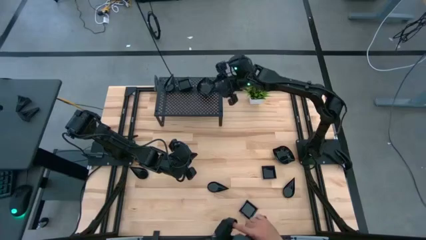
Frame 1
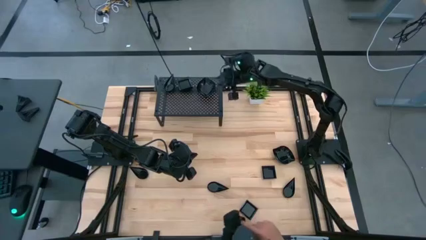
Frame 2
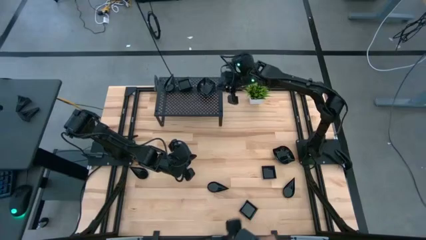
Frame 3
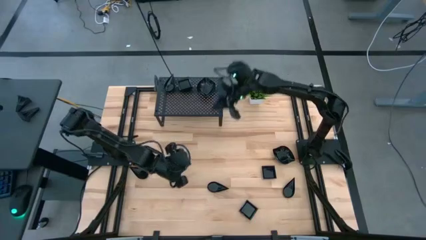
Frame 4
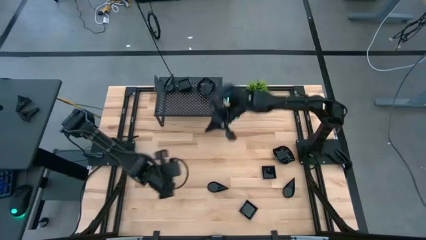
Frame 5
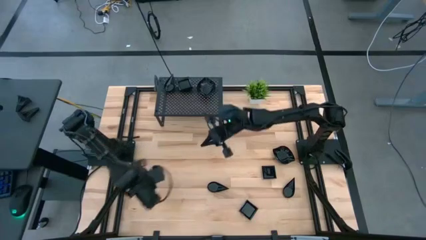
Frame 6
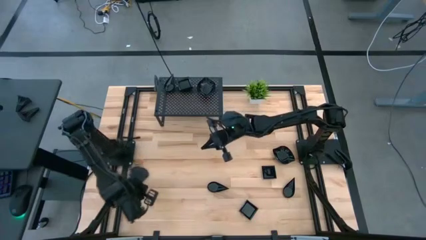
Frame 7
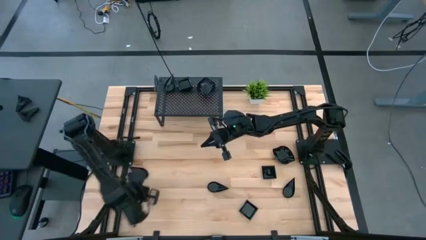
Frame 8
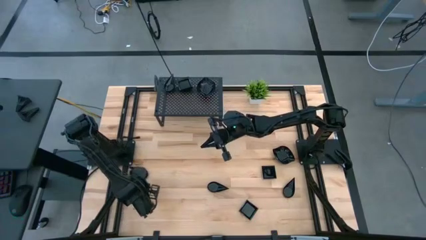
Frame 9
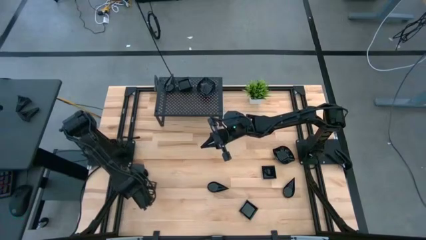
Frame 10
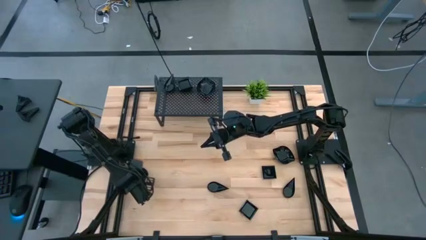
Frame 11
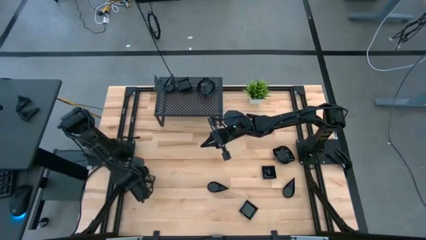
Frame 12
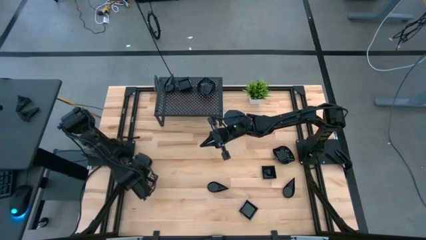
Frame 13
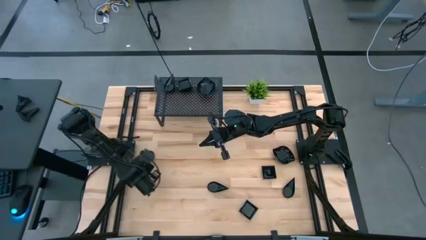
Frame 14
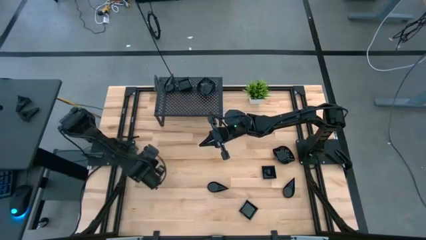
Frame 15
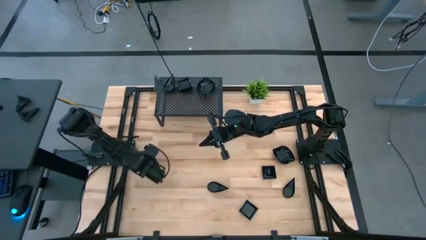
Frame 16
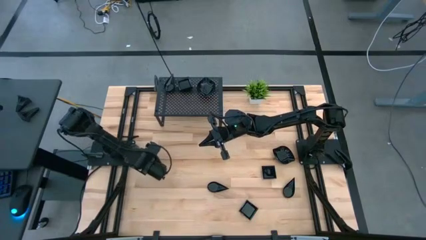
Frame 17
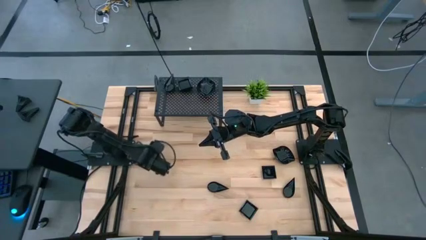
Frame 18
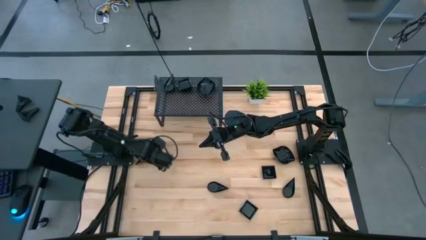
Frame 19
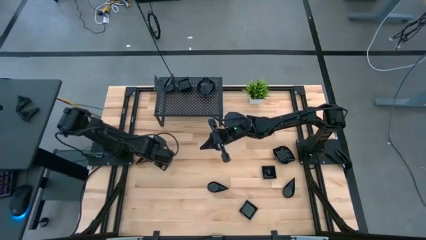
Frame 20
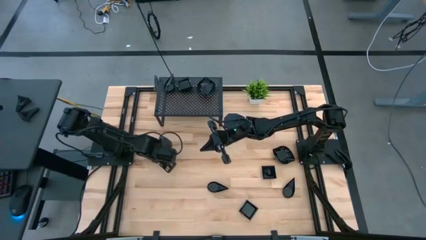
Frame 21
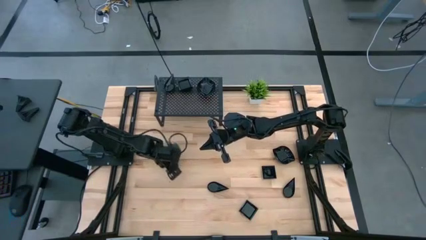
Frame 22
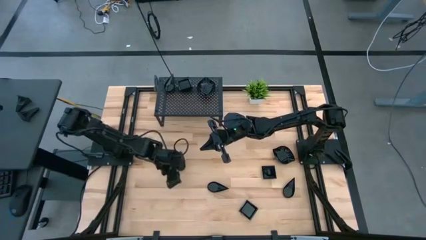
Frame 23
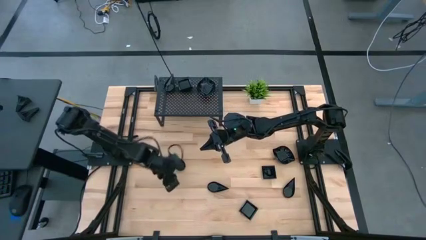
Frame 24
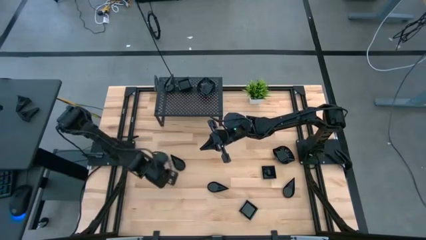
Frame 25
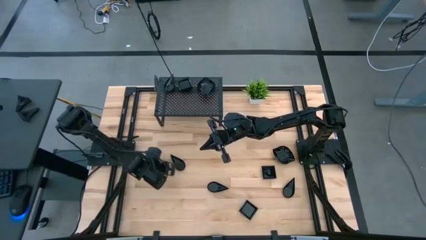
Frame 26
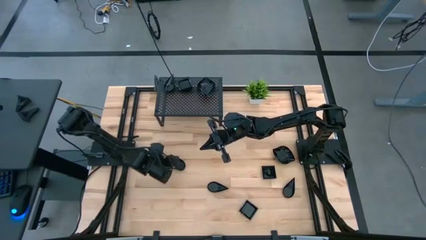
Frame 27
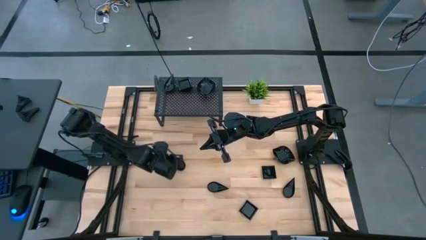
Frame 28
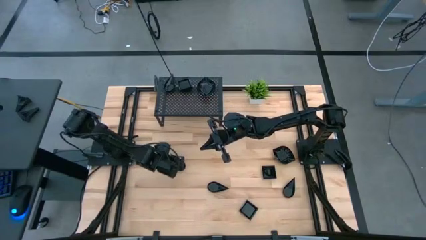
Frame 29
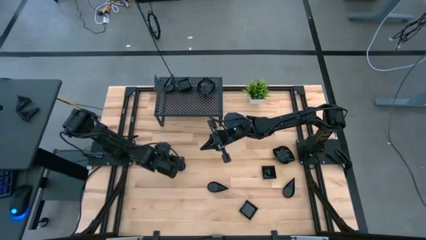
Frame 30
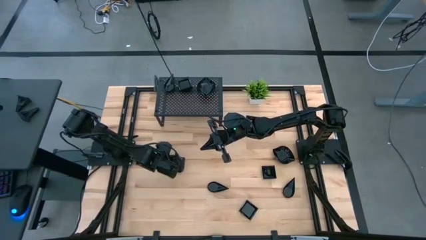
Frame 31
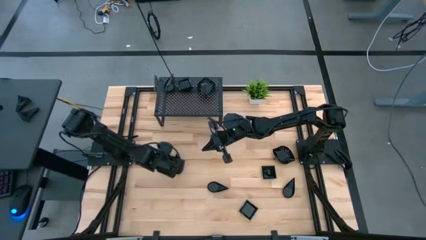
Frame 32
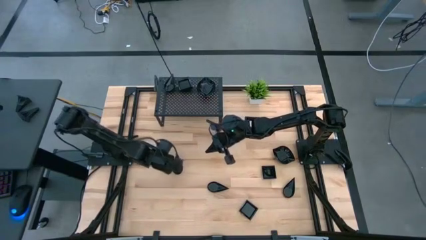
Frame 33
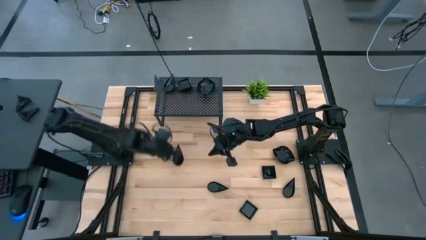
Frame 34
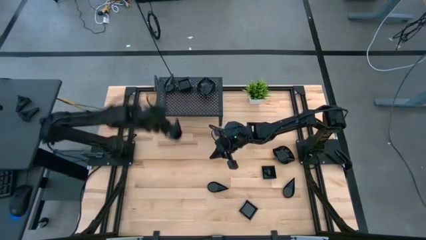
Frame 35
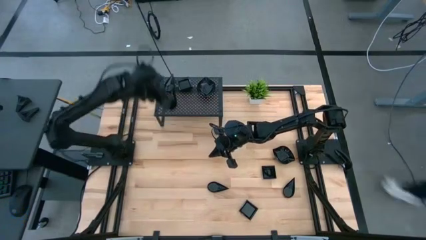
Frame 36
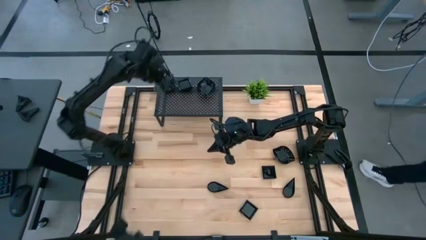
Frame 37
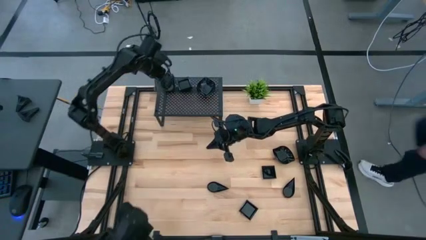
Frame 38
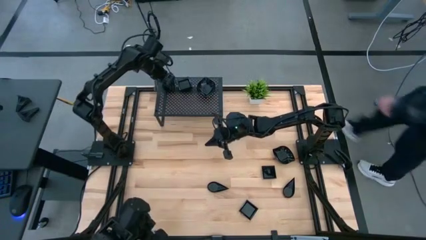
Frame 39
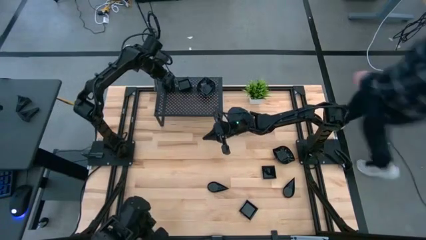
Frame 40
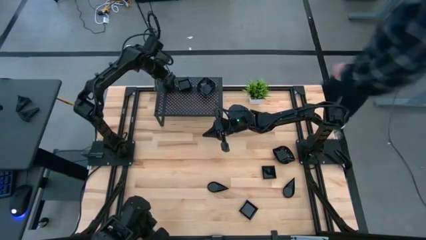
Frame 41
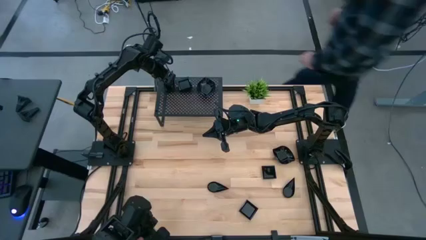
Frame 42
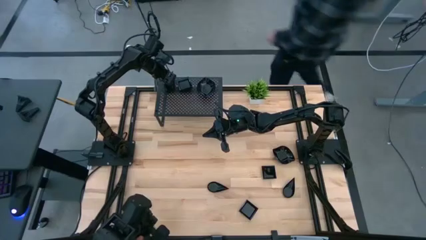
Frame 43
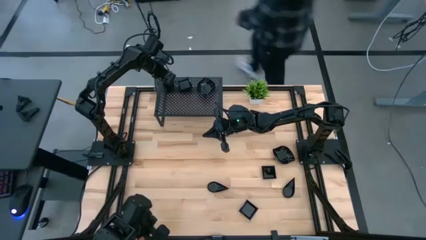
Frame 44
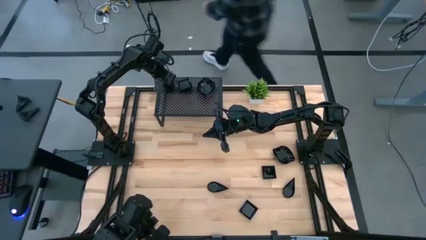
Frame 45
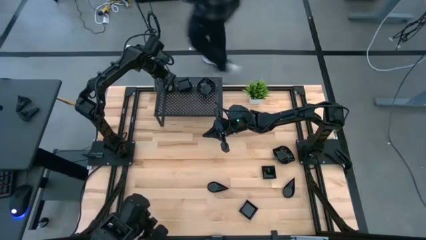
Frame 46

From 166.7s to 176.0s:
Task: Pick & Place Mini shaped plates
Stack the black drop-shaped plate on top of the drop-shaped plate on the shelf

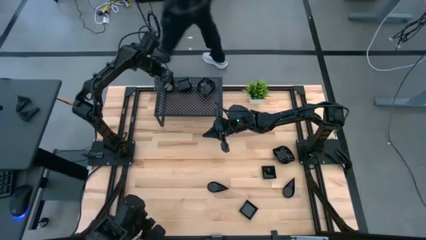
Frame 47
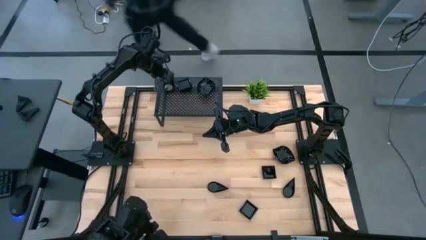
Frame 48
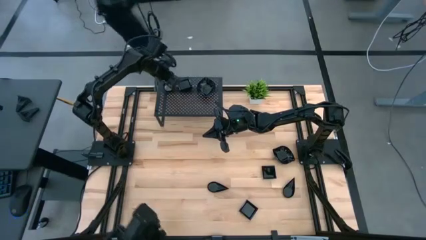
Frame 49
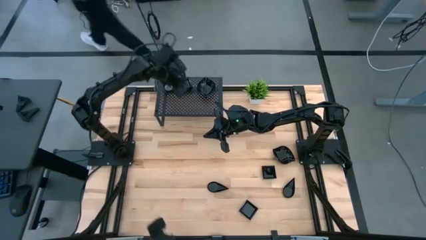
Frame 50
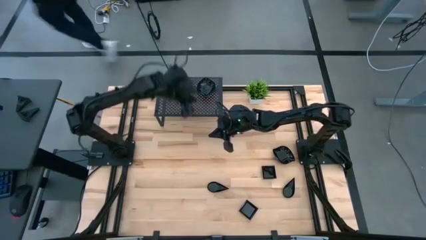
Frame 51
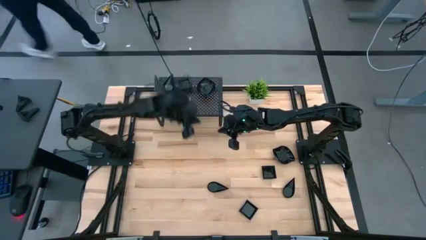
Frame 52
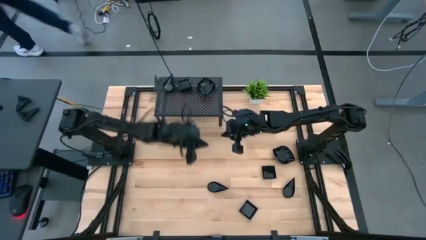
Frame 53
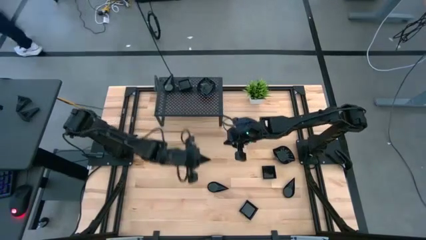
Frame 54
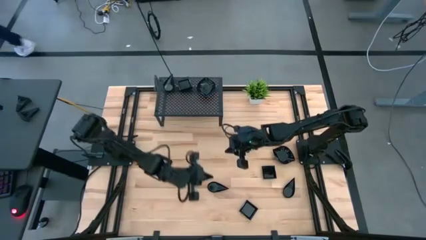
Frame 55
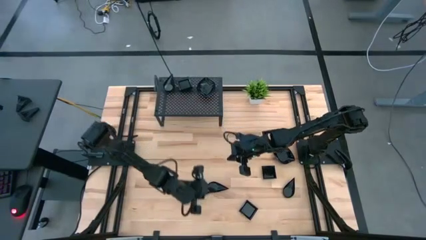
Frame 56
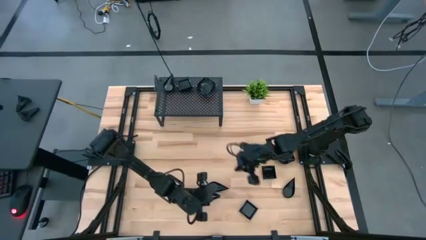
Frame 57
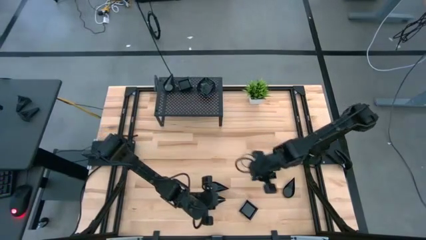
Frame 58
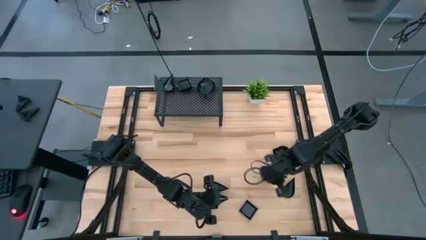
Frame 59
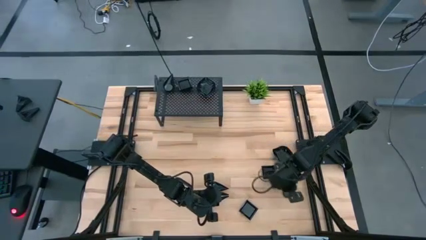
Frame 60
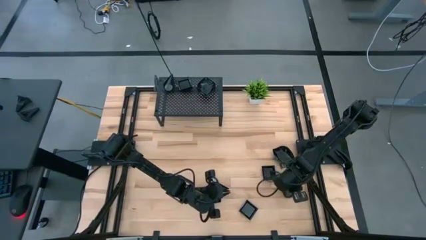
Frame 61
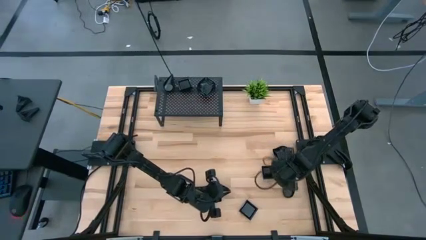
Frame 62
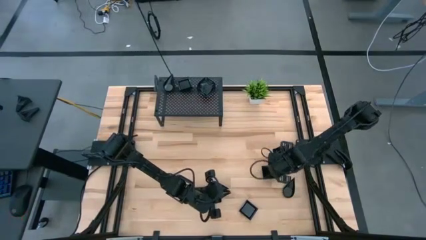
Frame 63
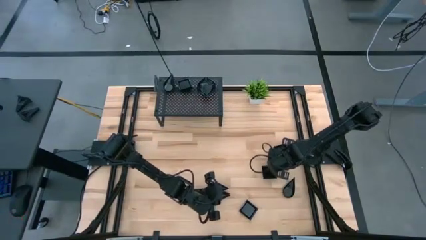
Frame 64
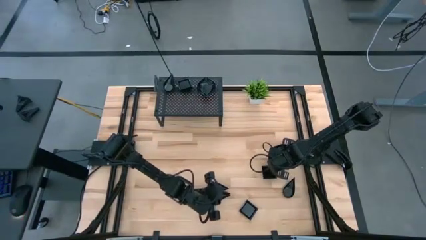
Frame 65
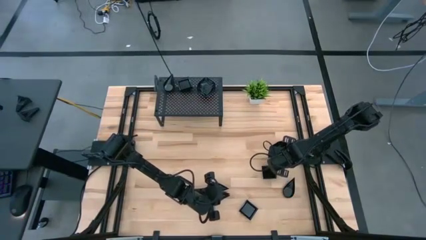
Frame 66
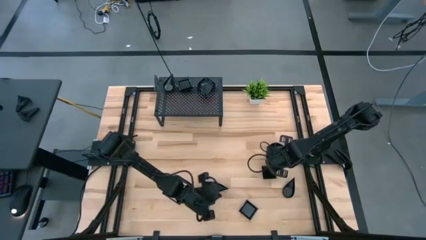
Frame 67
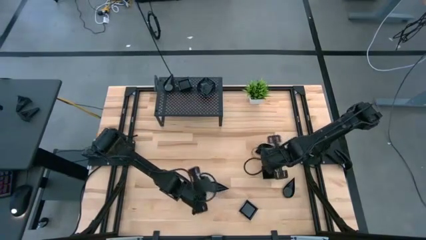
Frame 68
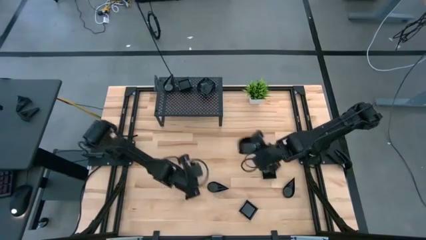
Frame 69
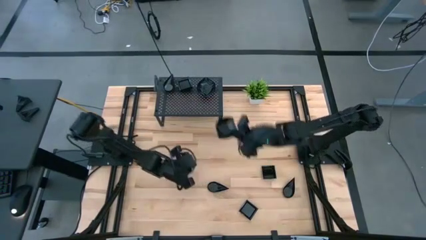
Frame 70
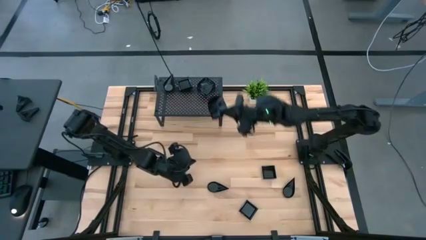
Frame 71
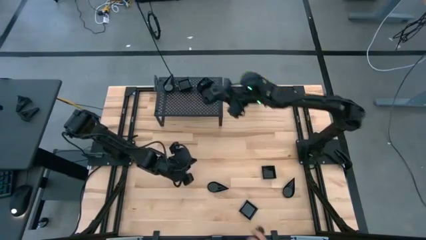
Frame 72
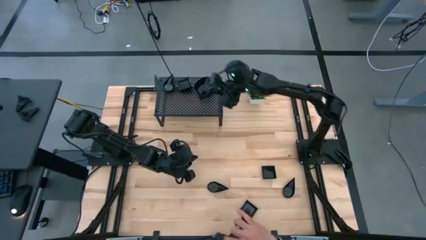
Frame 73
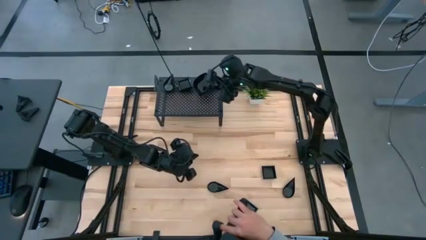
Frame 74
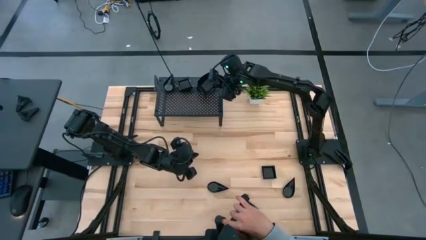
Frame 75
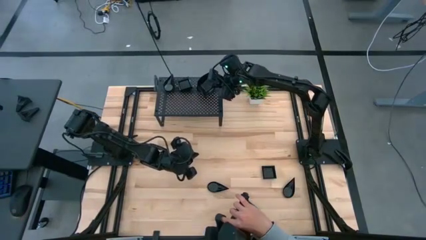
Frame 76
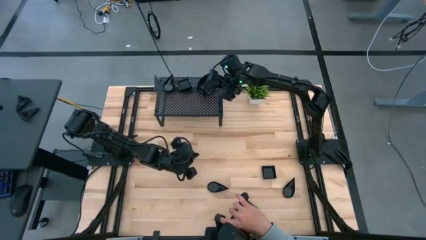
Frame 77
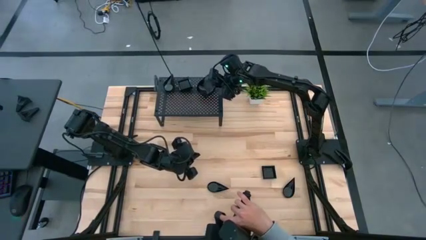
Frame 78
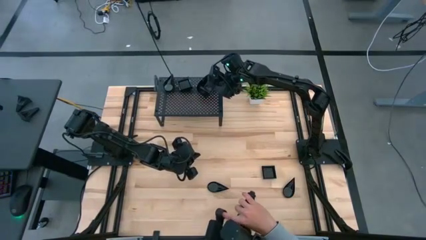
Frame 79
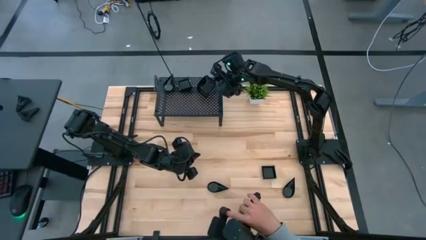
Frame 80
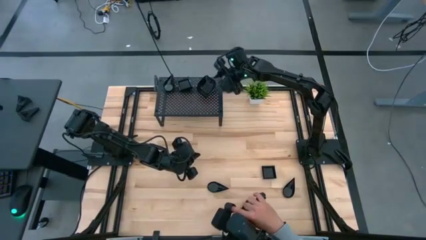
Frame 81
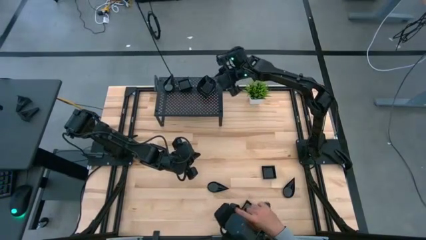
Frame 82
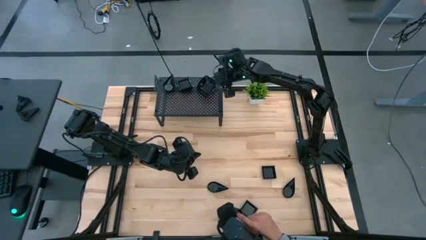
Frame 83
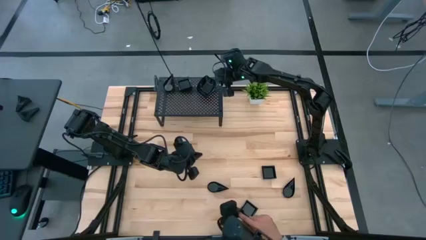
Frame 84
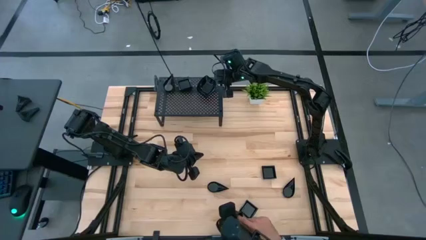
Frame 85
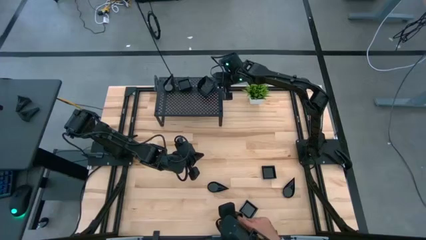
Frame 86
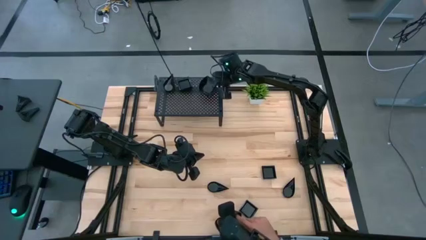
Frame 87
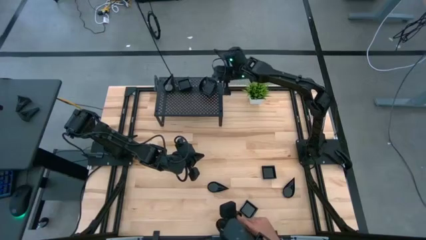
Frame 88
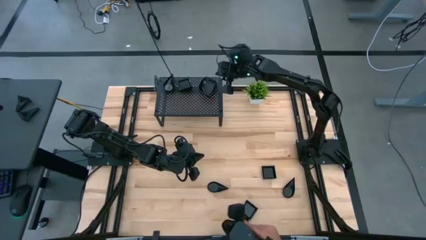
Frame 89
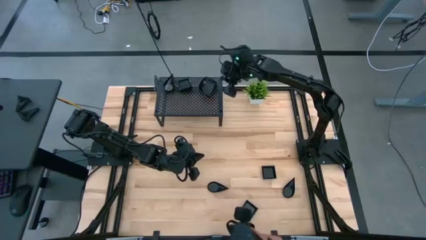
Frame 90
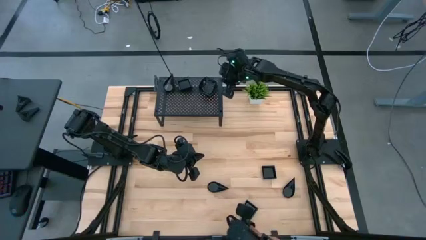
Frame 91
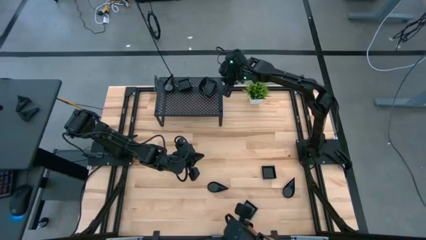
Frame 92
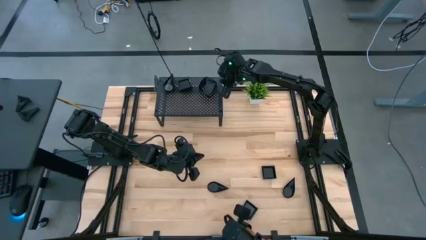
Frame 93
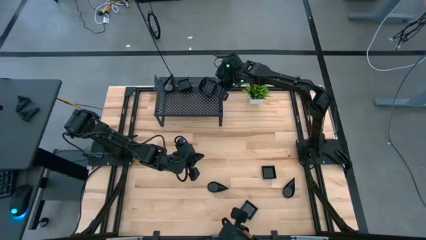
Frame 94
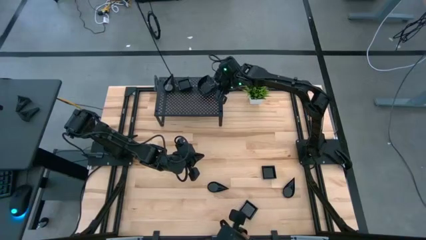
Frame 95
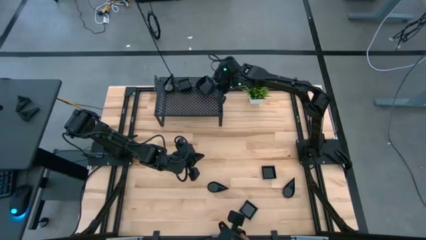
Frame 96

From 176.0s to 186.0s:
Stack the black leaf-shaped plate on top of the leaf-shaped plate on the shelf
